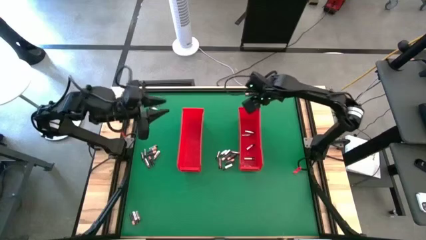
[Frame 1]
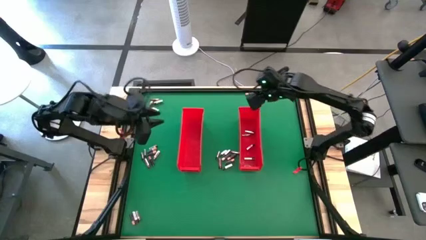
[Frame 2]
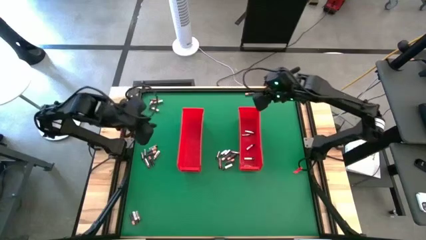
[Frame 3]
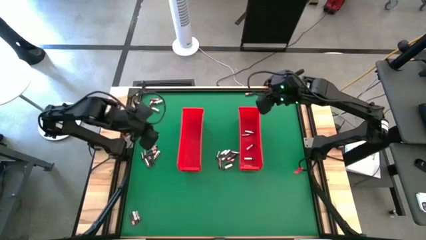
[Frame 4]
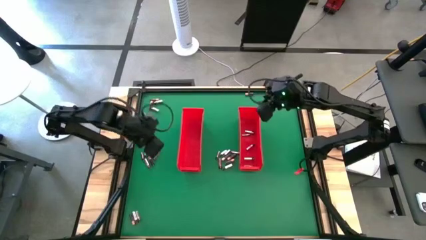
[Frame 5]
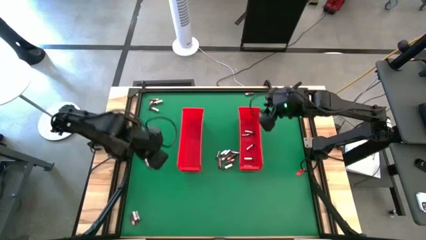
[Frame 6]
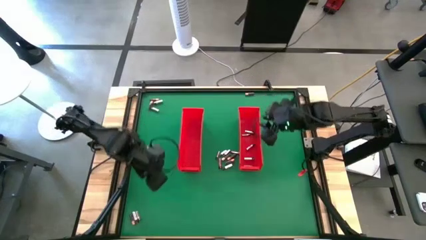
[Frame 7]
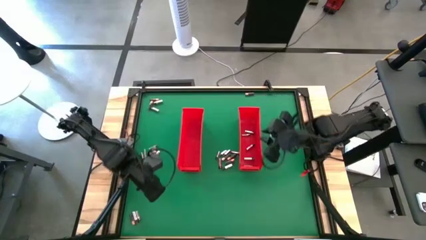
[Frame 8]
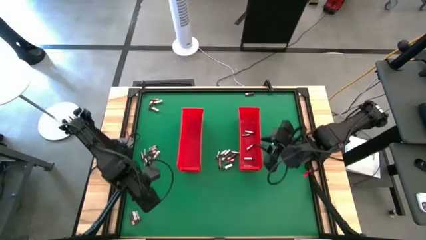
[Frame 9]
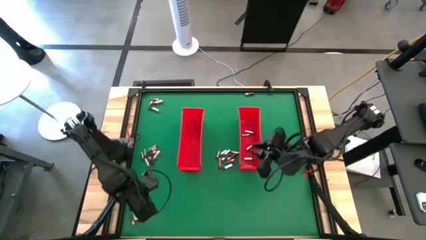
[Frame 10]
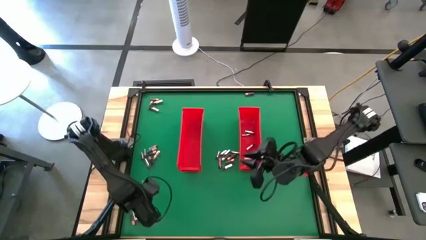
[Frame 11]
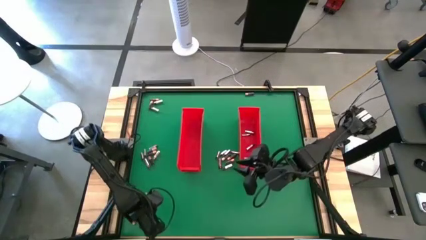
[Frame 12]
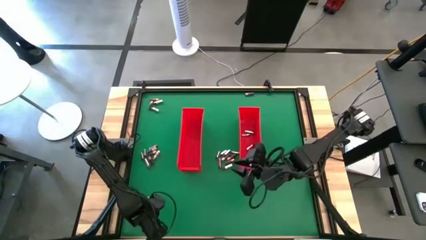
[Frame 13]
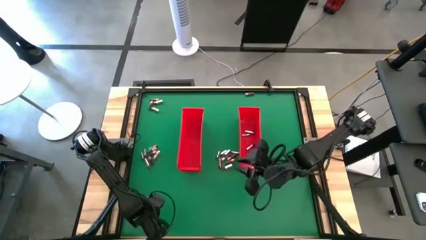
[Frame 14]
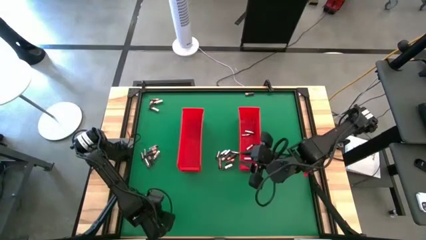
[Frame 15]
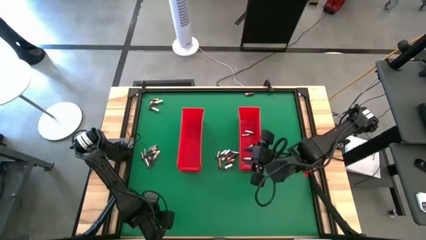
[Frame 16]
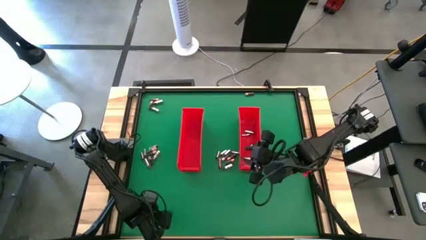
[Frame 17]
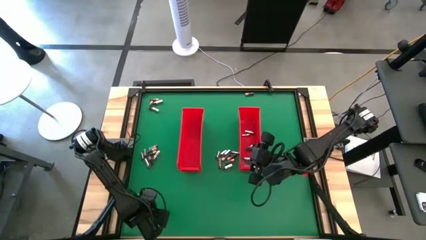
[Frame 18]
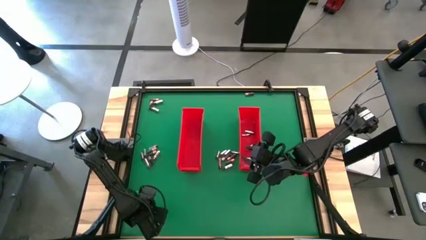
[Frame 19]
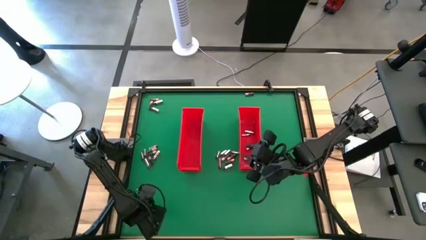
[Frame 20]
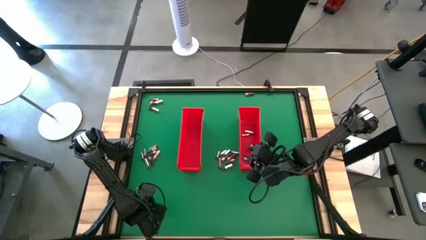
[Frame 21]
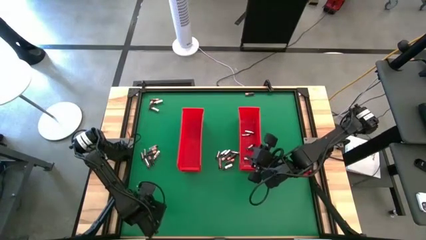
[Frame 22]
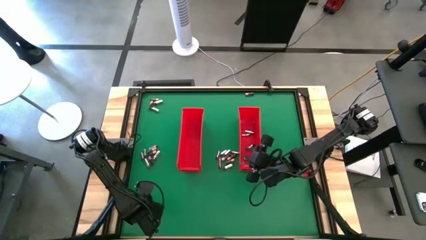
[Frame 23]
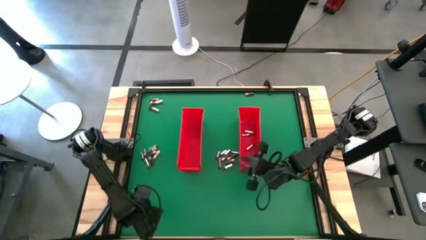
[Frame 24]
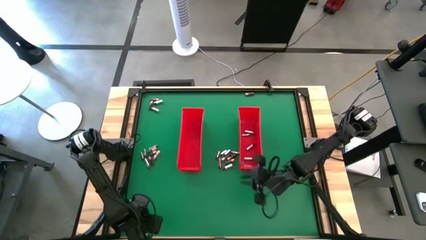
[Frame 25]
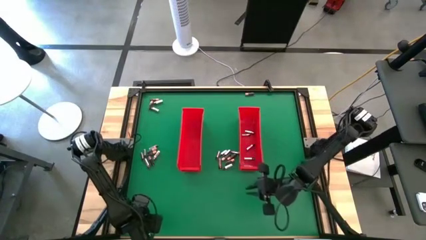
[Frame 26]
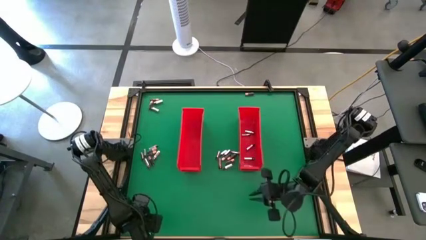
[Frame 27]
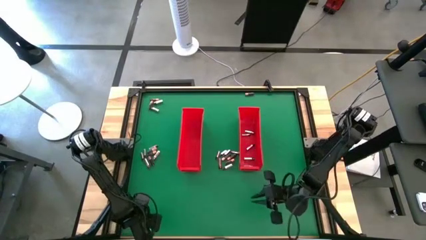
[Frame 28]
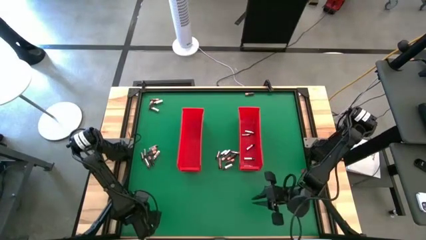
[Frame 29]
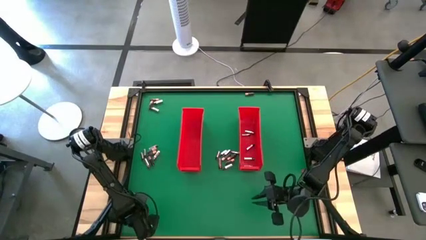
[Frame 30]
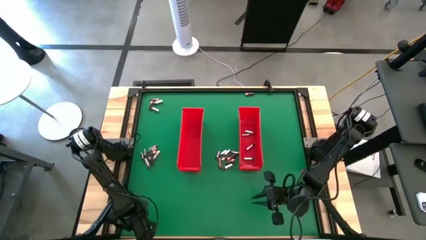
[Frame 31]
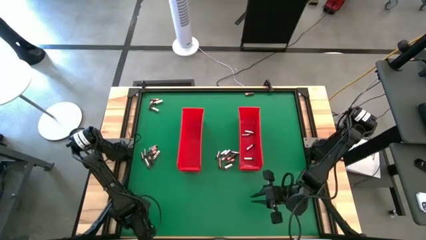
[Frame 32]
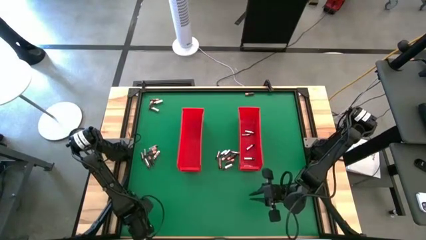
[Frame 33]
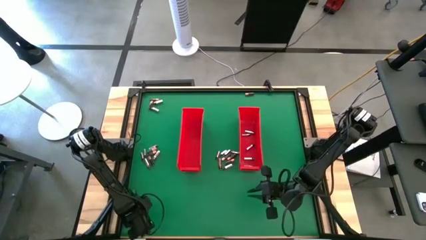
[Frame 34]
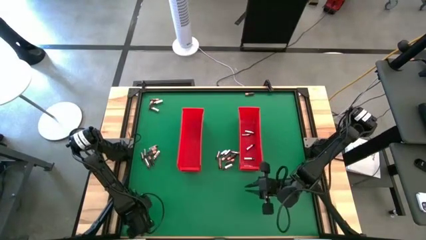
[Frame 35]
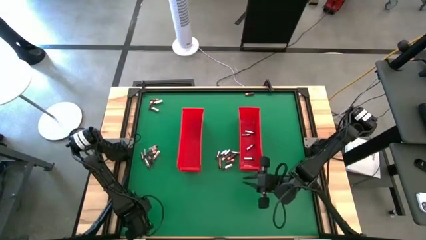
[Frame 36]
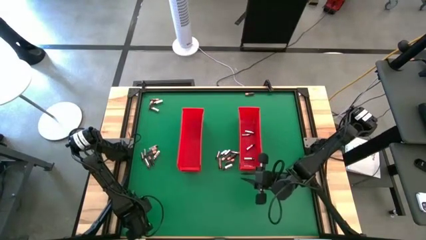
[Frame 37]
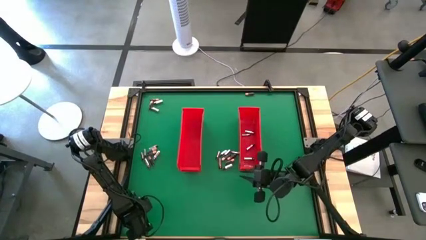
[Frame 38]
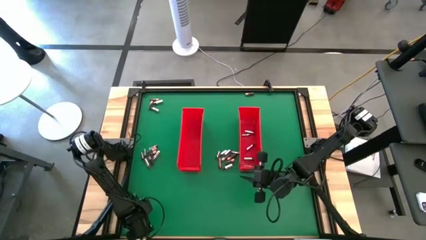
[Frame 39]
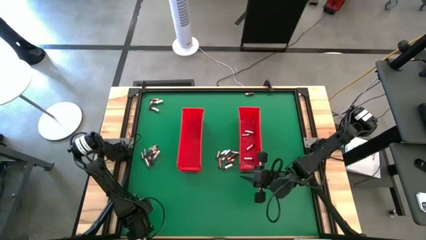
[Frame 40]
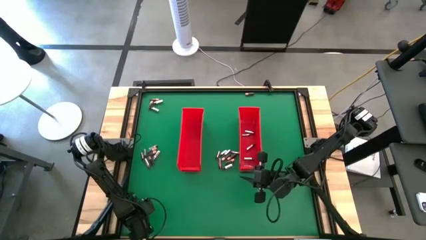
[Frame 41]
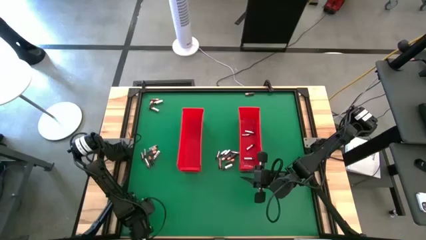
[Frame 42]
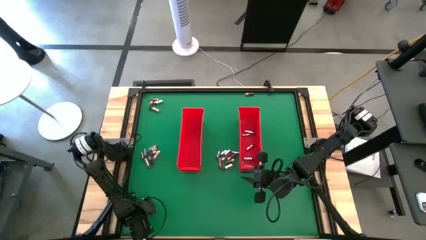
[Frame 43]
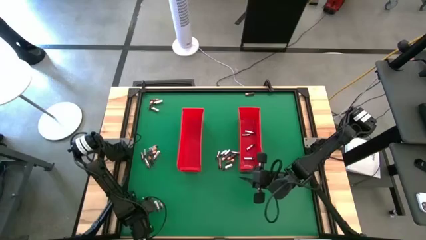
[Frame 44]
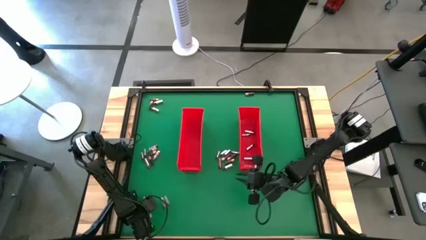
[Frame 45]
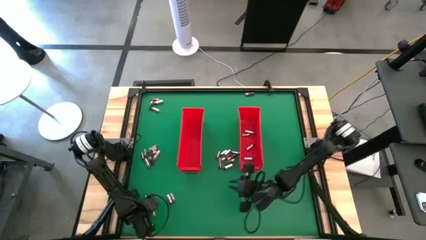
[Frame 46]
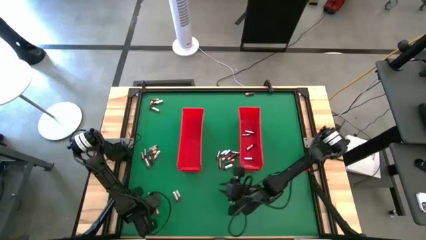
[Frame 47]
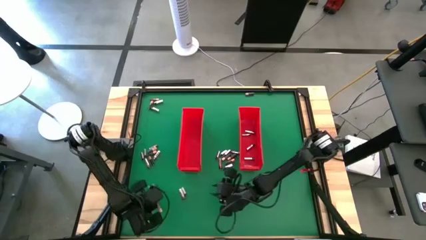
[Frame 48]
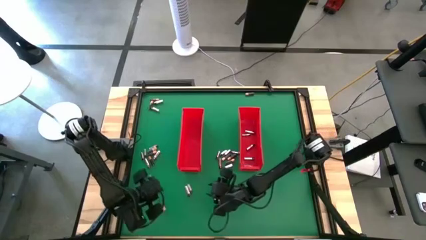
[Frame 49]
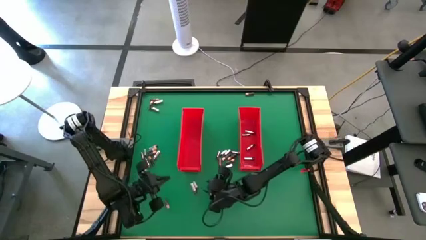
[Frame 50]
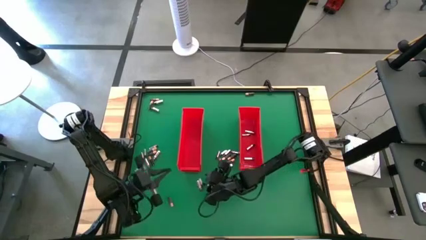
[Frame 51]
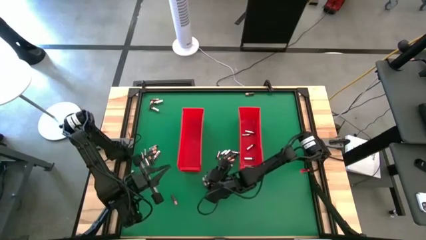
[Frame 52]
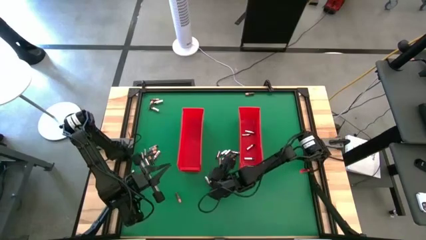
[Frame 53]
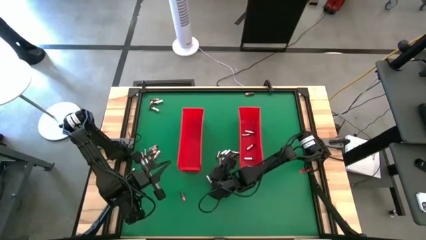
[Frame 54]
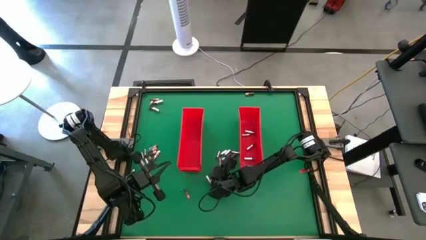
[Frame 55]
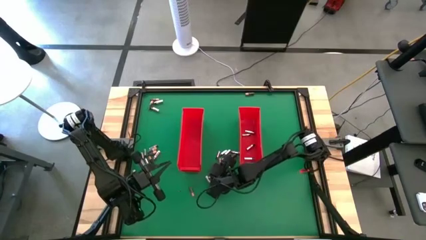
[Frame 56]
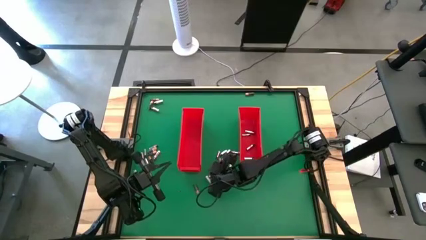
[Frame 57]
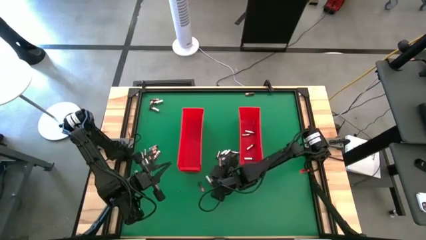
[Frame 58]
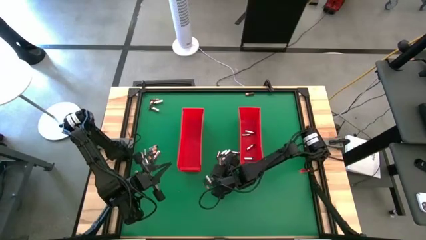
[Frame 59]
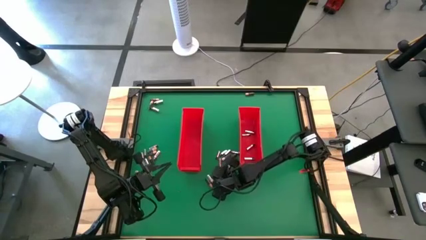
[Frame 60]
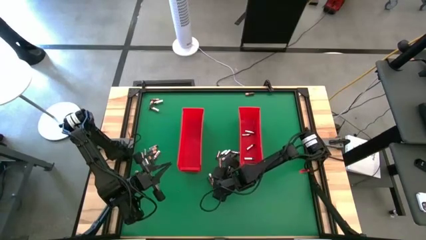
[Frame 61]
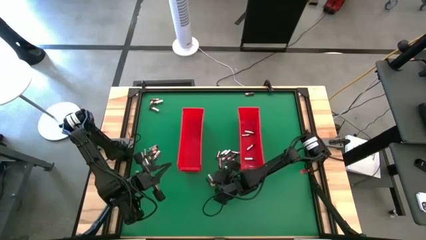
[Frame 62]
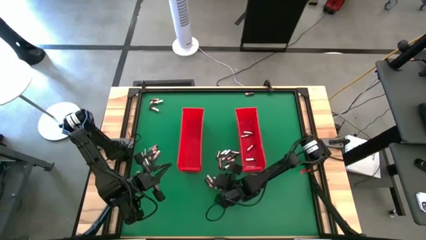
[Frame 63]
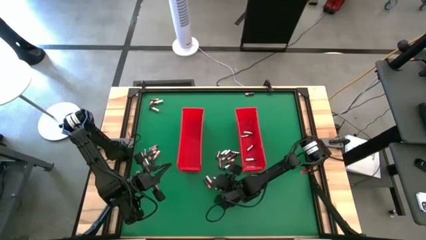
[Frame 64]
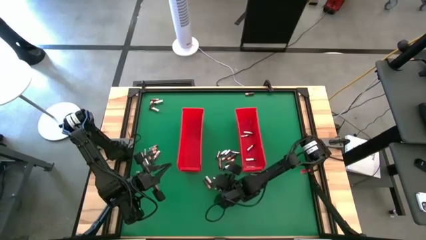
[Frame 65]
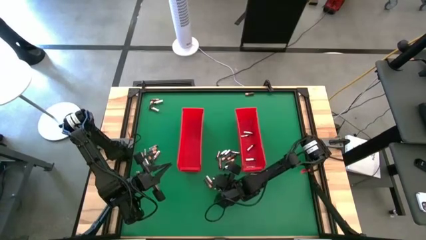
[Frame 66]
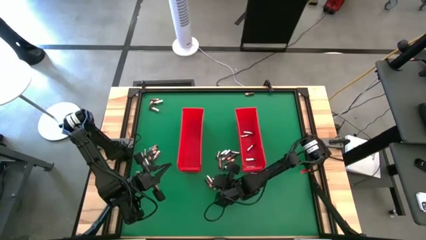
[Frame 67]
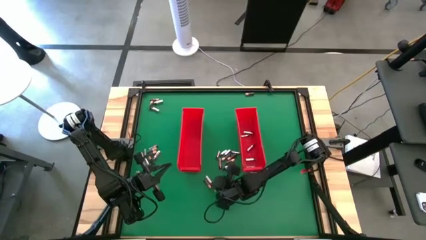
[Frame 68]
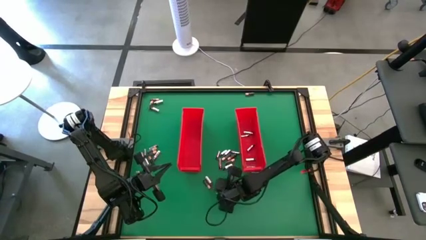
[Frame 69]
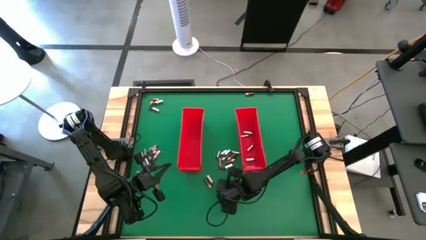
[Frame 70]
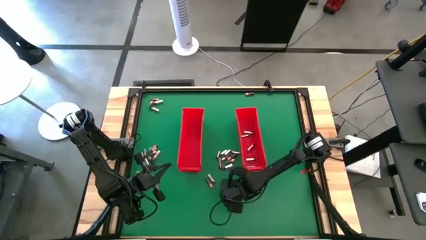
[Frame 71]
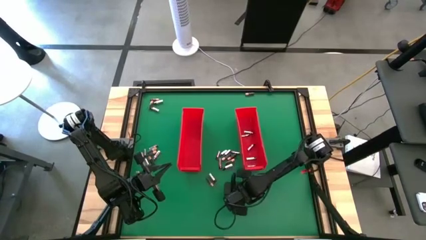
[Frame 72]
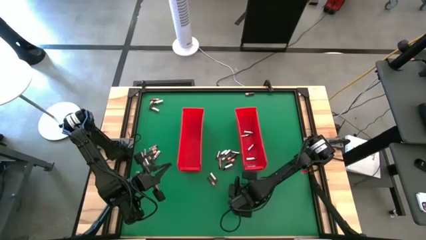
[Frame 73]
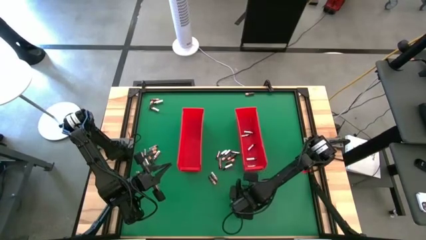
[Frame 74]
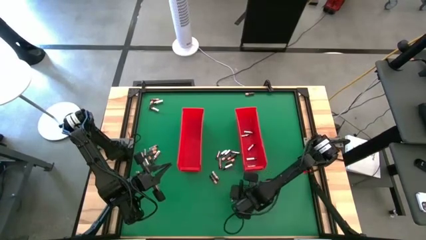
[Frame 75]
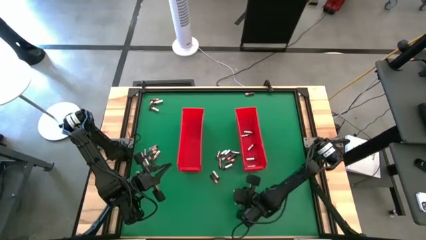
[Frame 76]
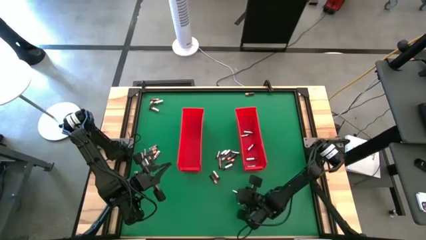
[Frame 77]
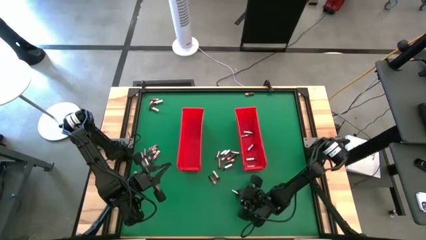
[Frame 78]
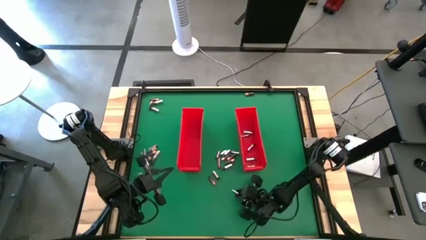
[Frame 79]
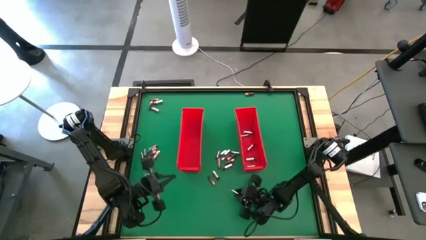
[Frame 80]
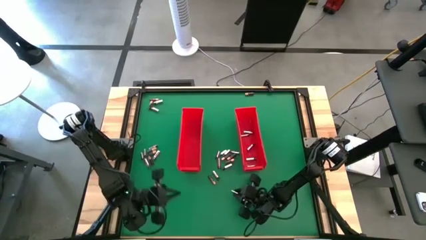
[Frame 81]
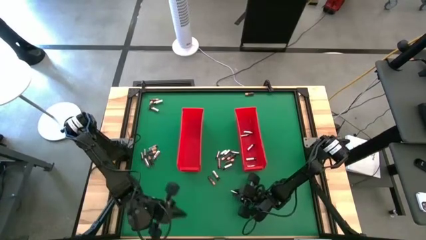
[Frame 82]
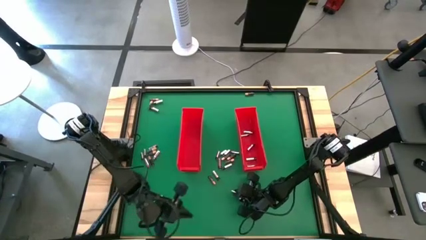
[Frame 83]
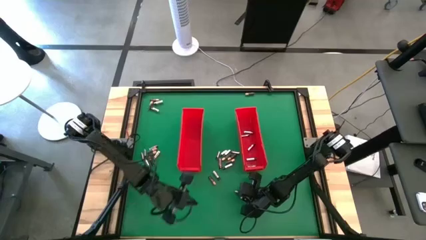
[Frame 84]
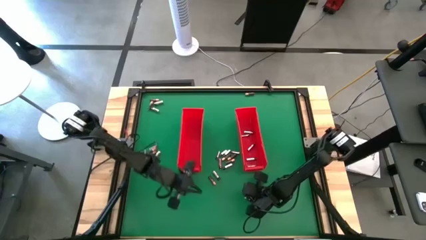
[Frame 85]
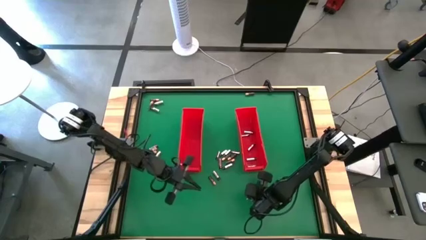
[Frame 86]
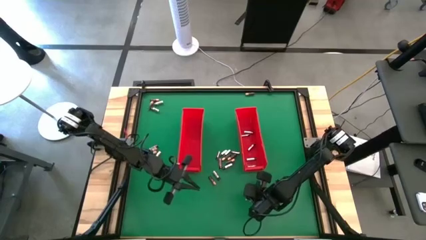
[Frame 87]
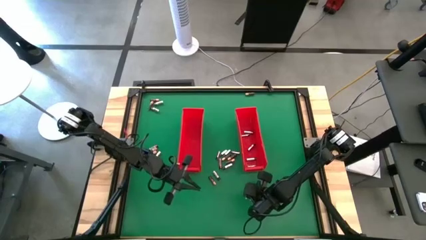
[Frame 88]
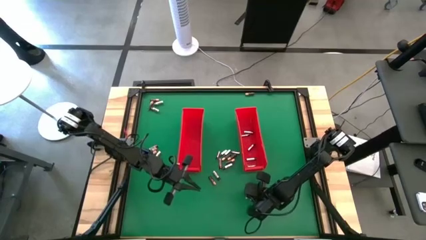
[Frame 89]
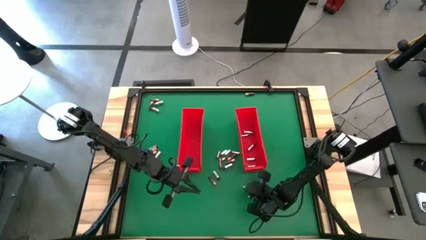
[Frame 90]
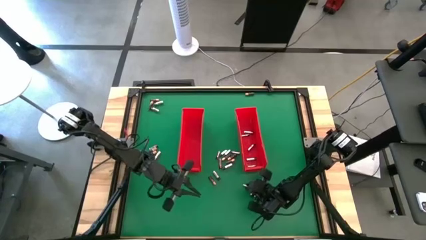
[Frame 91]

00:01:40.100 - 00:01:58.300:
Task: Sort batteries
Put the silver battery into the right red bin
